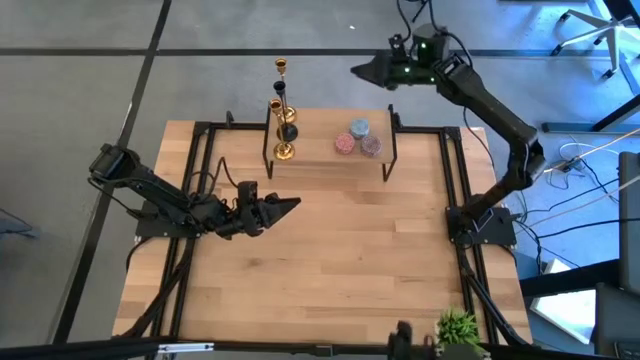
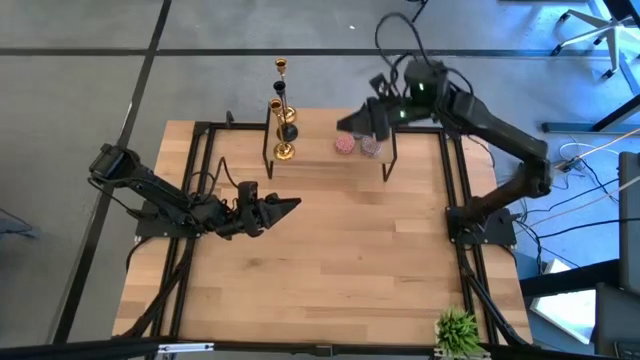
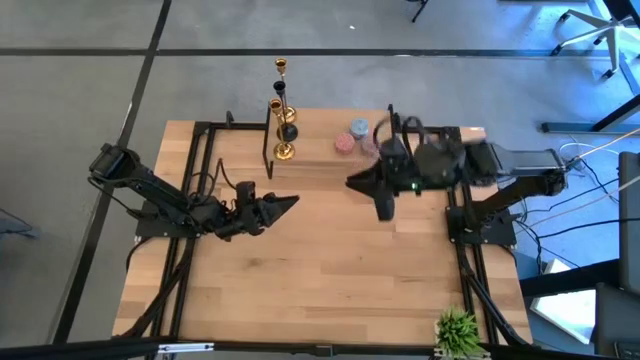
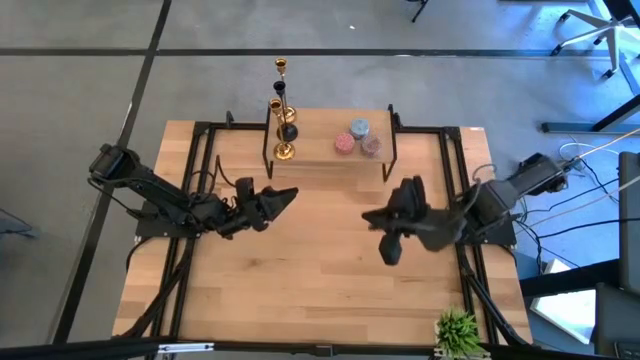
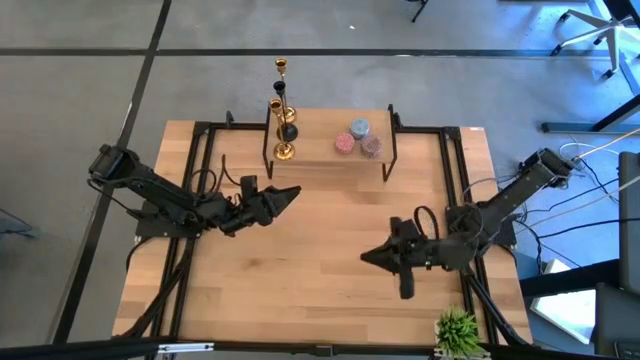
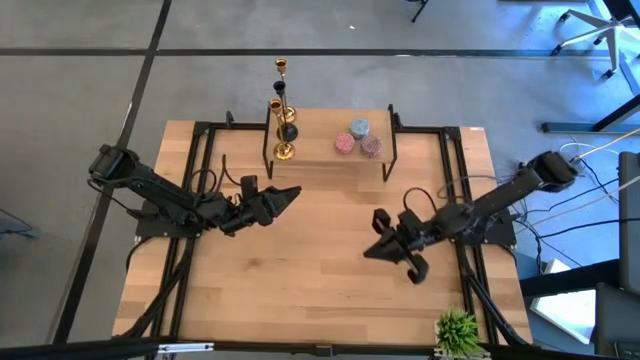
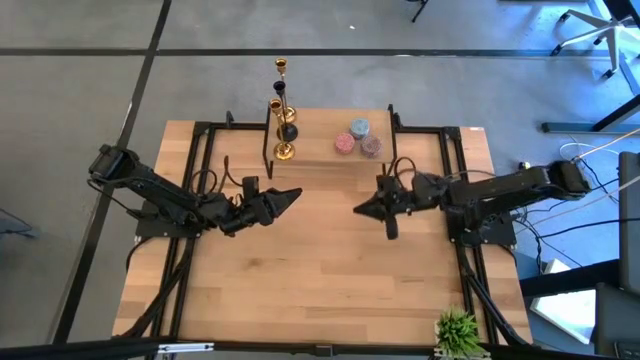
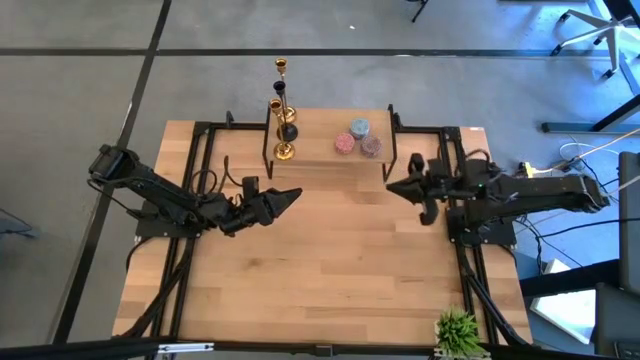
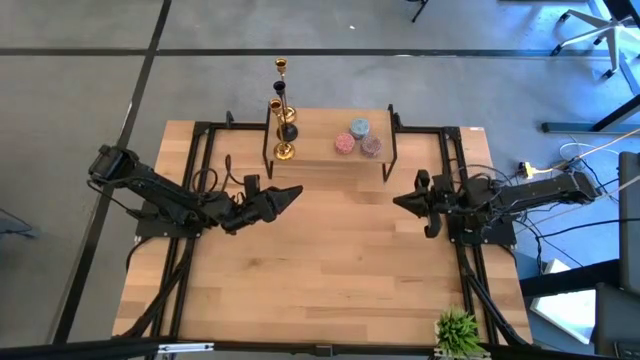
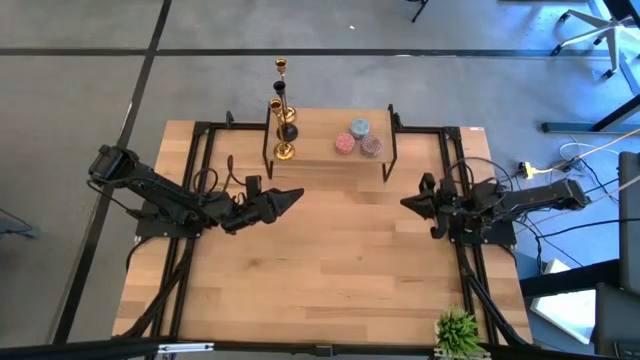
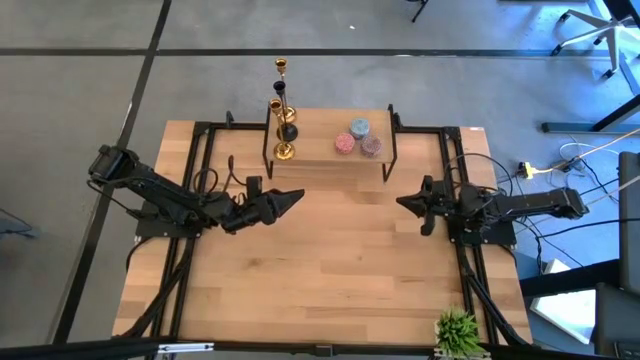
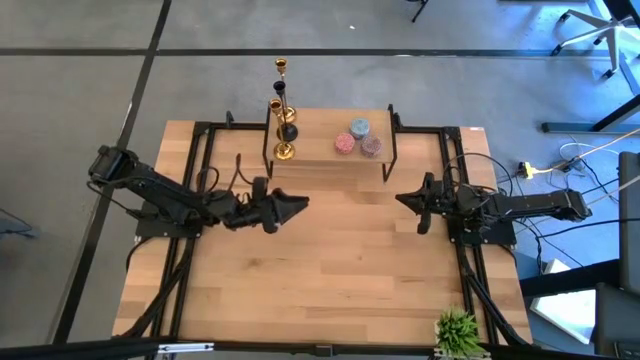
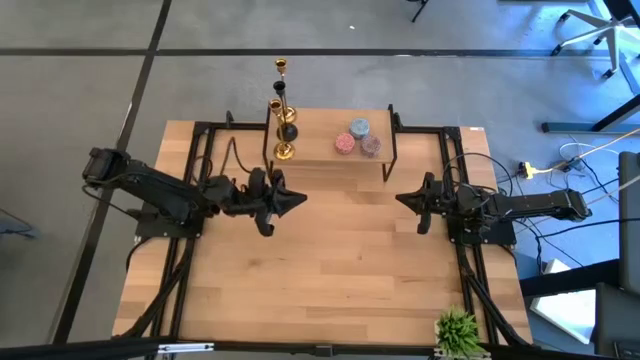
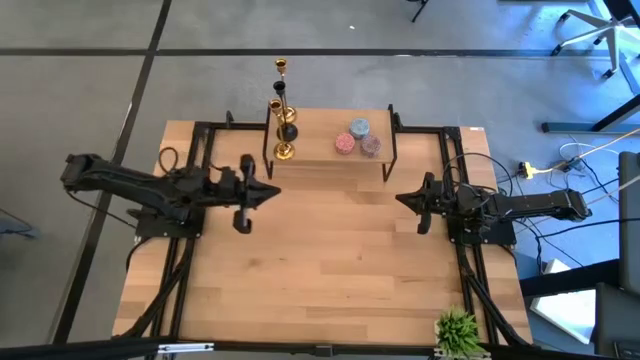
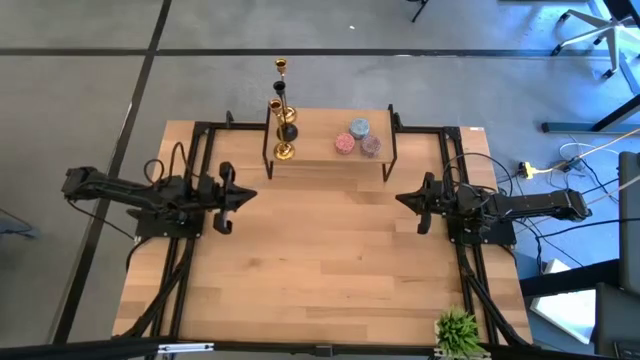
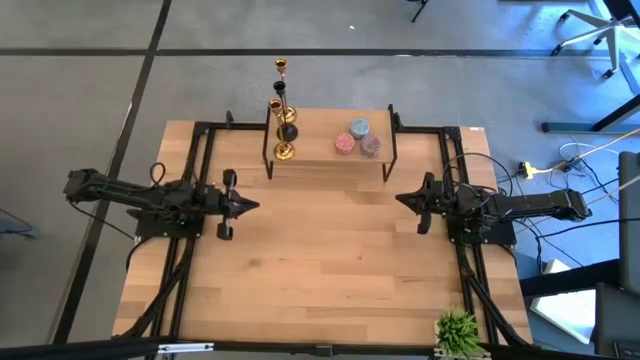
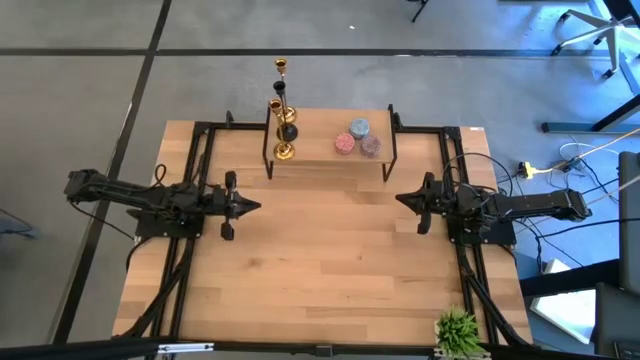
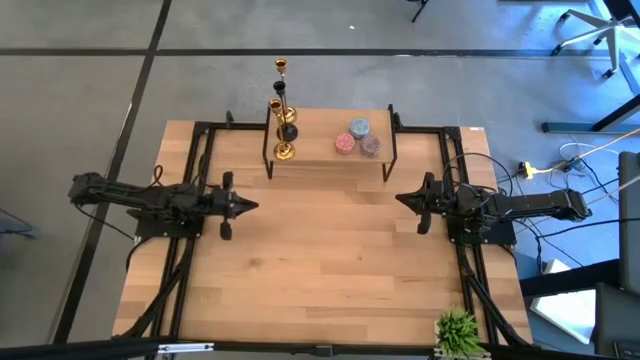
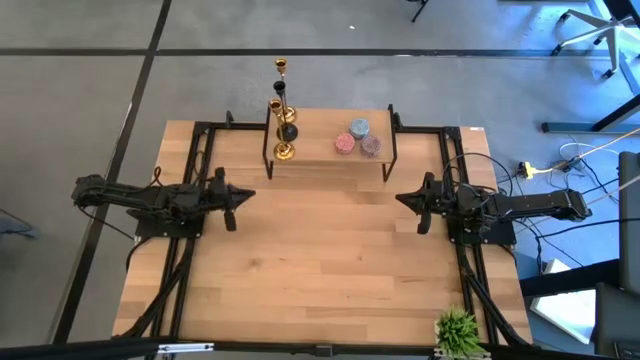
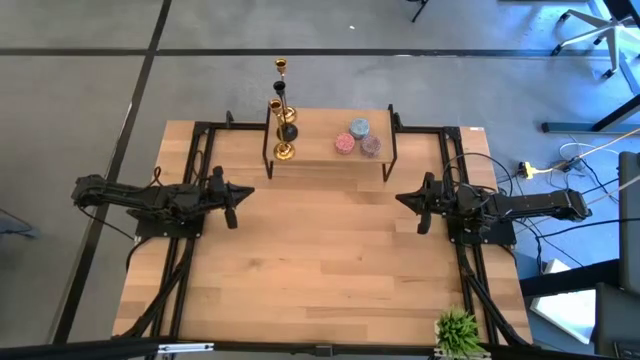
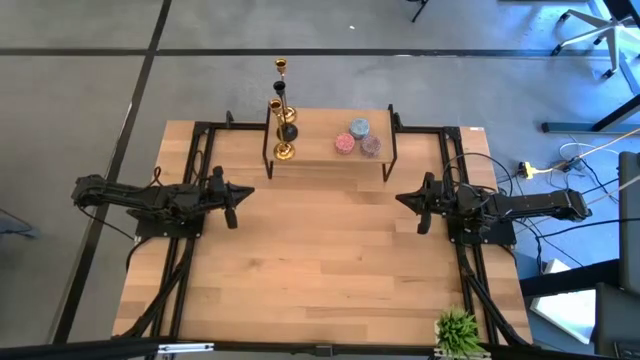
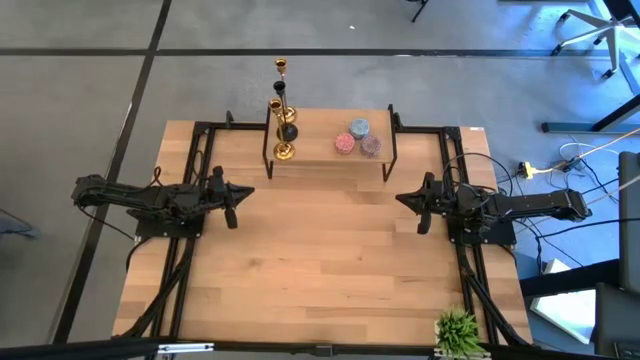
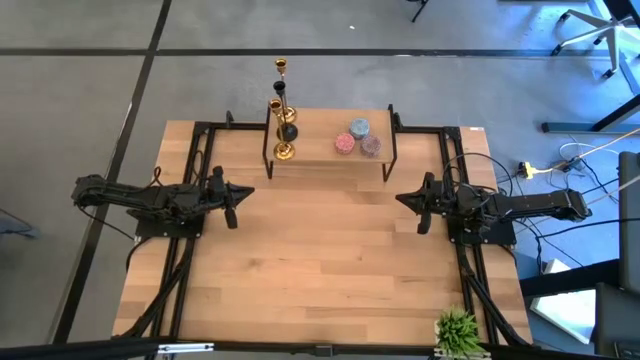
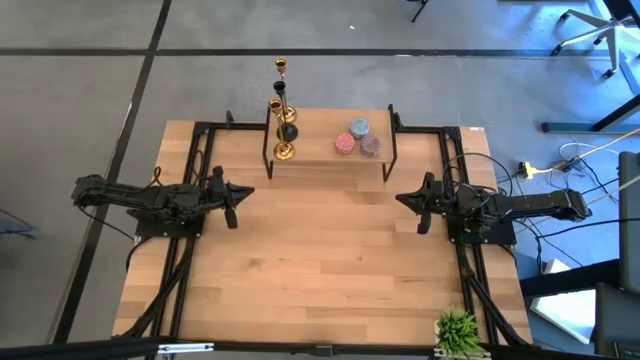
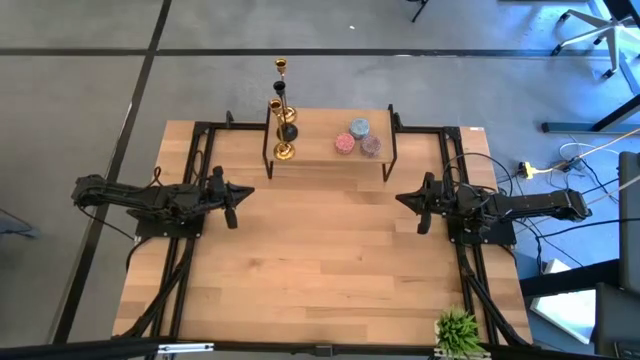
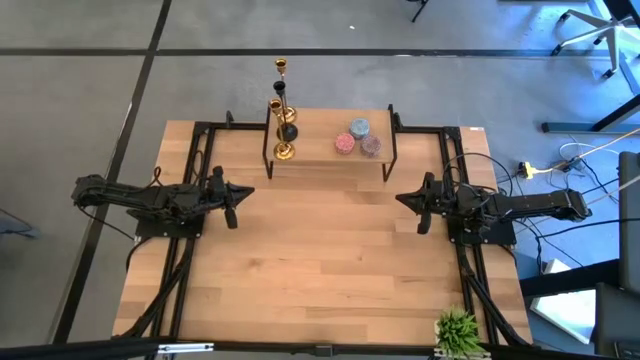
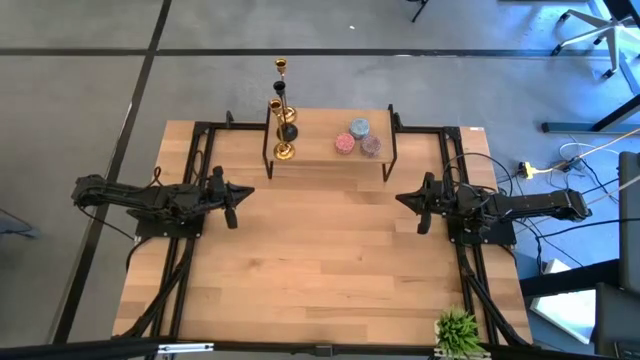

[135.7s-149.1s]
Task: Pick & Place candle stick holders
Return to Home Position

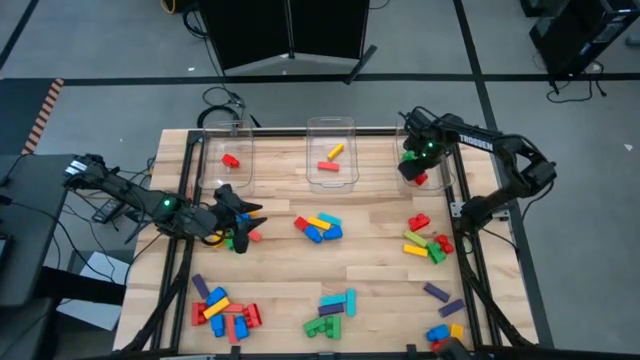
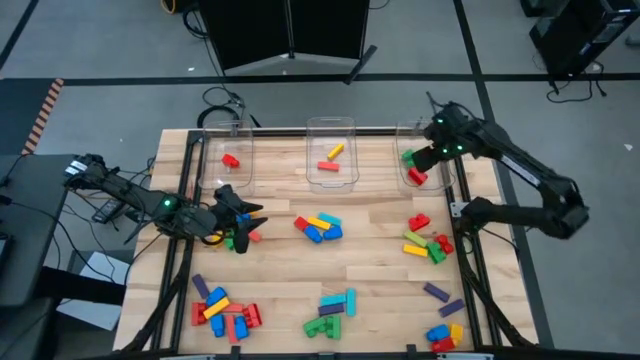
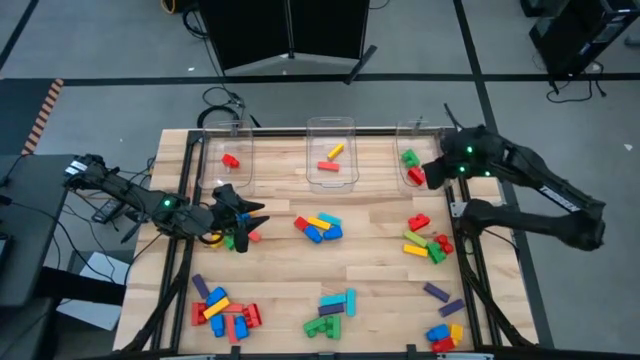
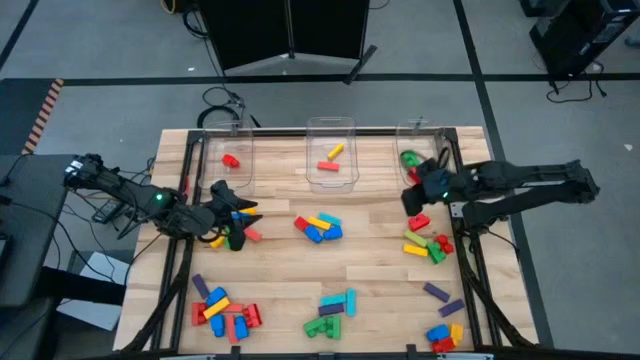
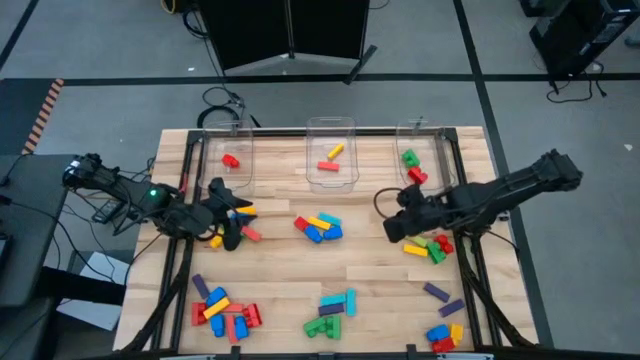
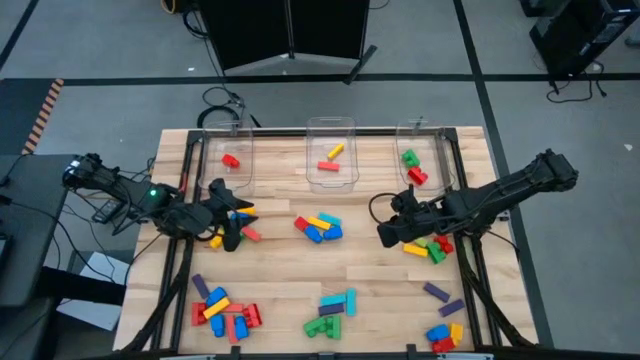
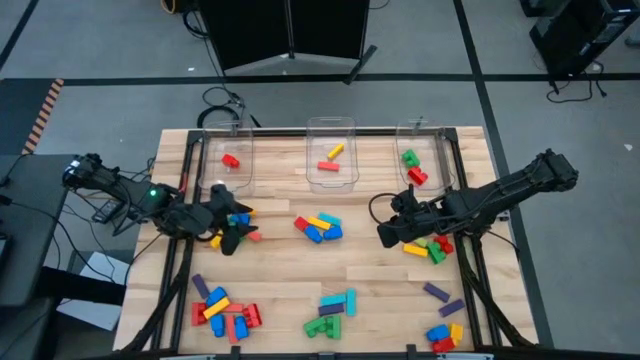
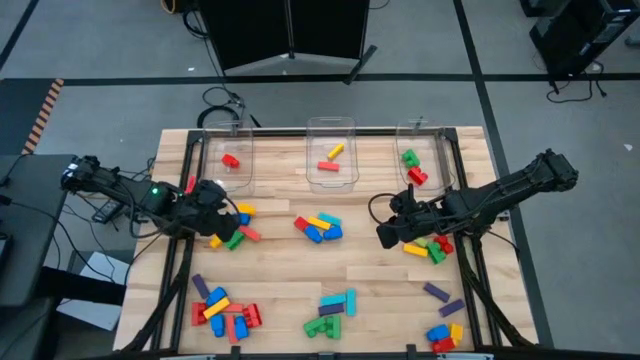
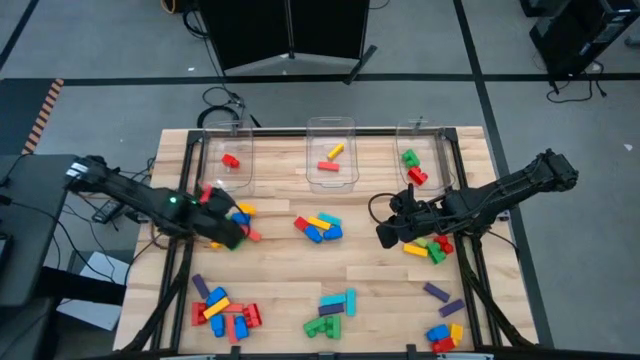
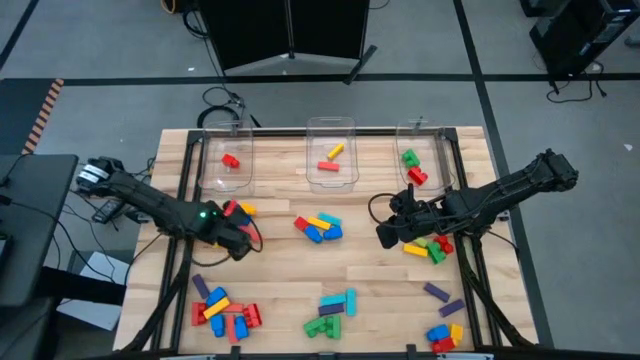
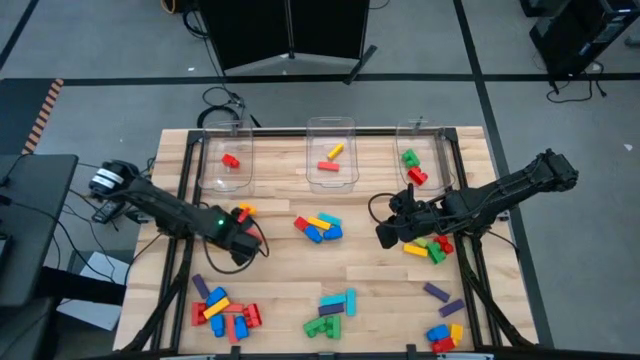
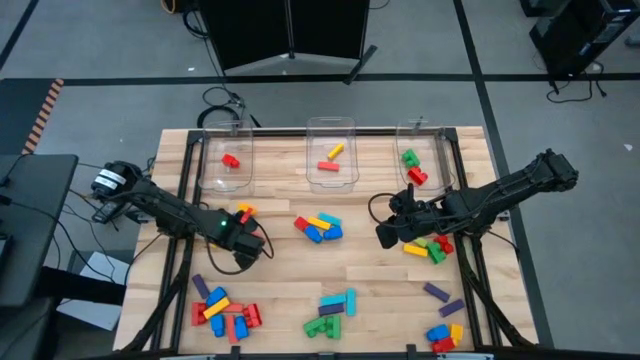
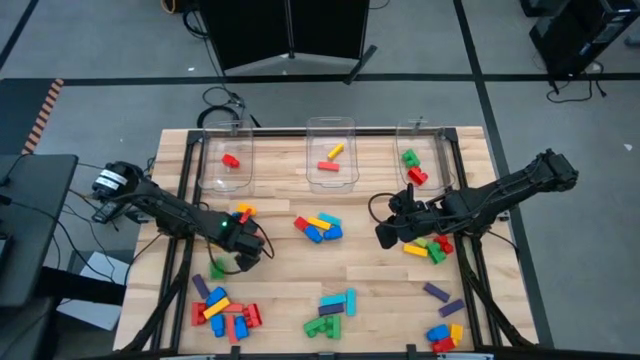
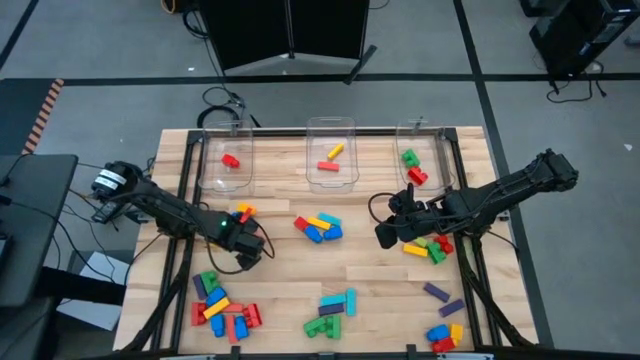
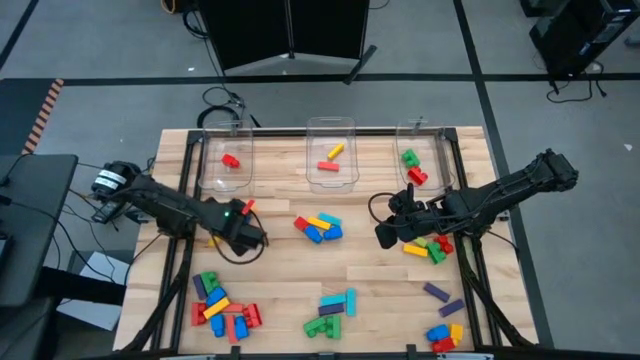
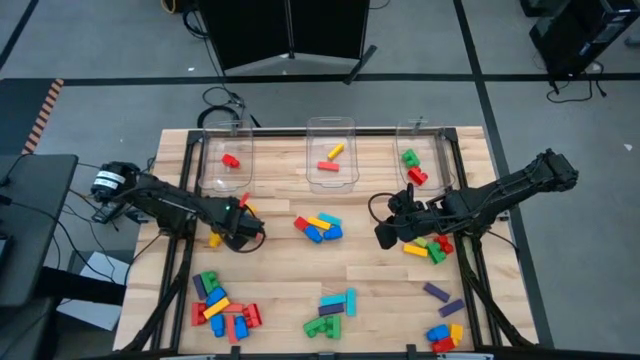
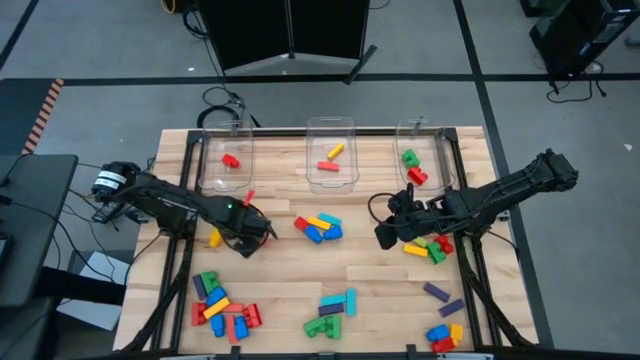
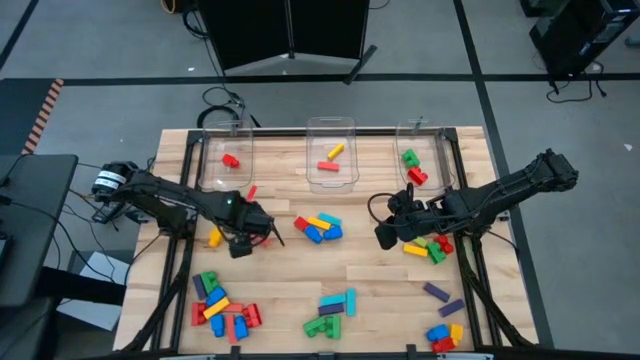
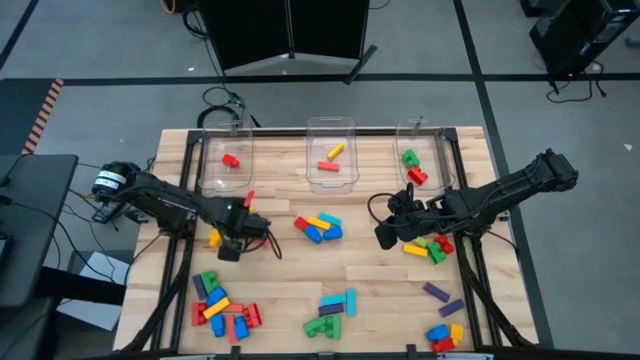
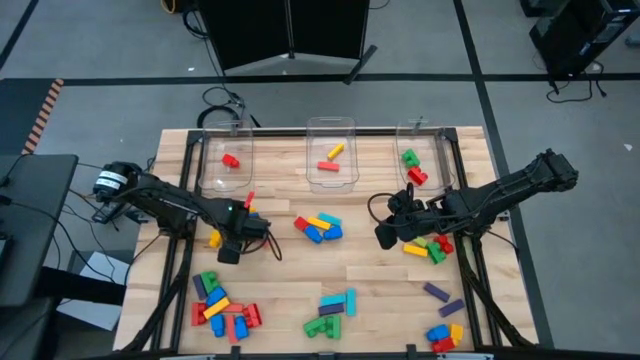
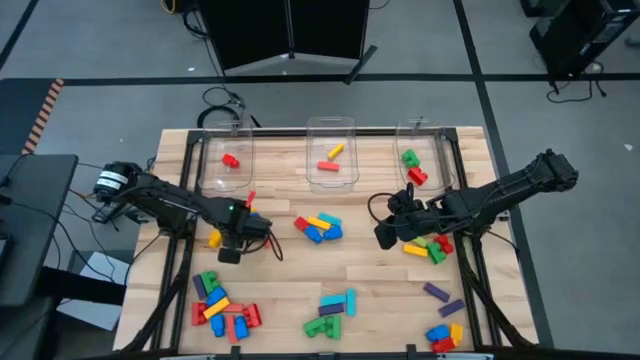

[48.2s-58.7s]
Task: Sort blocks by size
Put the green 2 stud game piece into the right transparent bin
